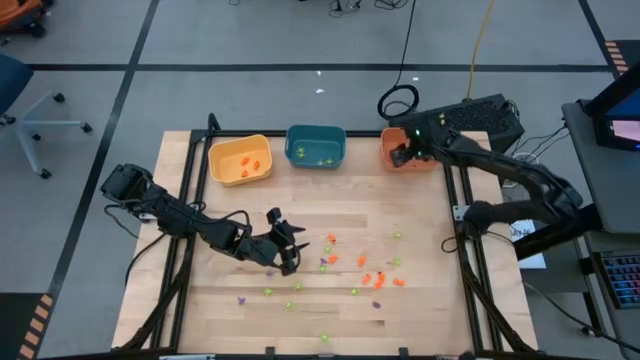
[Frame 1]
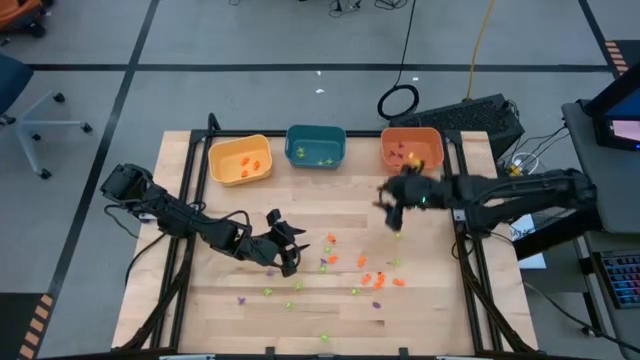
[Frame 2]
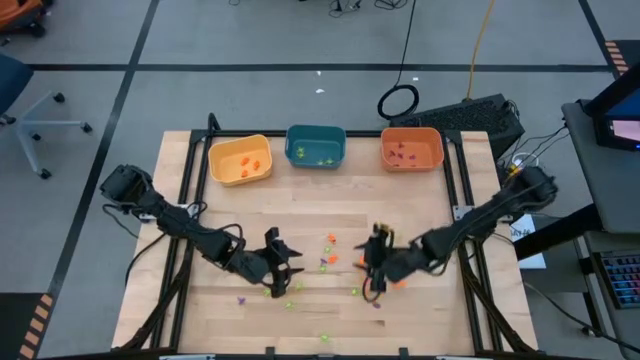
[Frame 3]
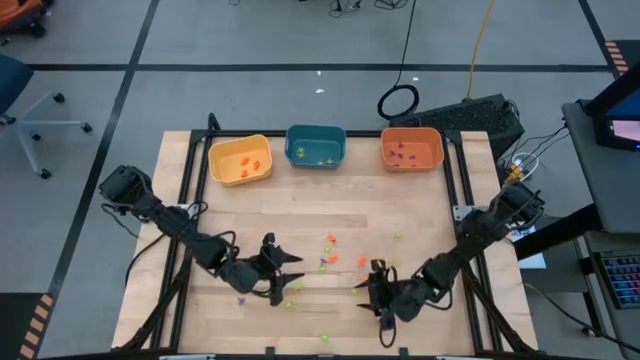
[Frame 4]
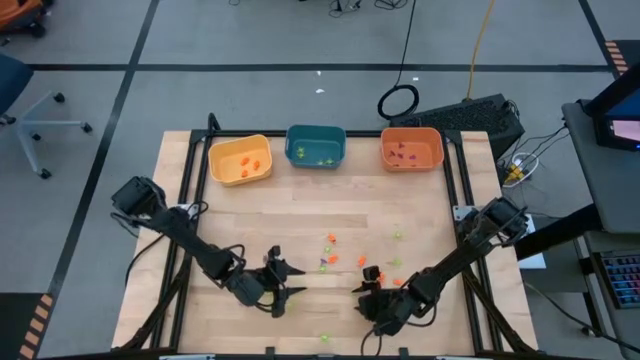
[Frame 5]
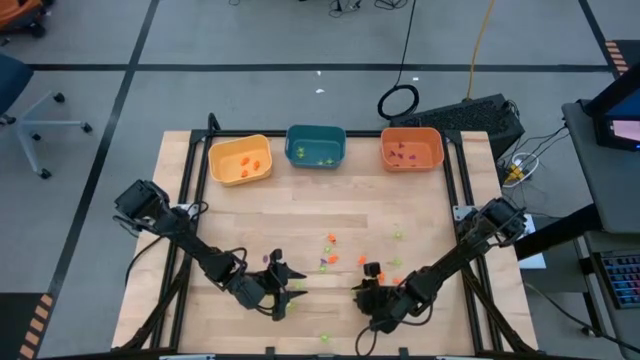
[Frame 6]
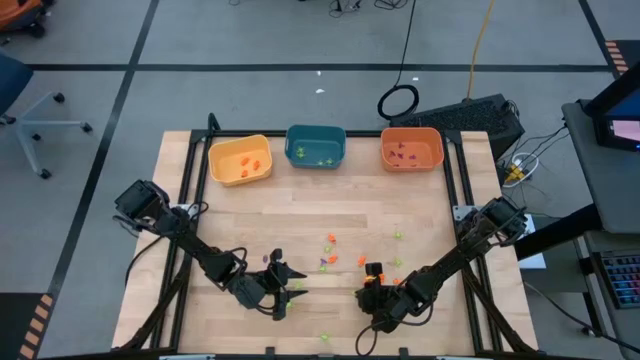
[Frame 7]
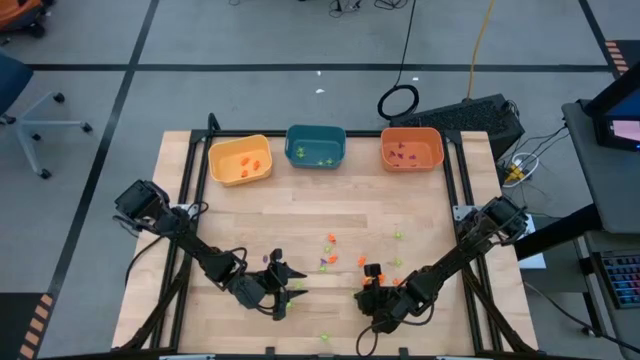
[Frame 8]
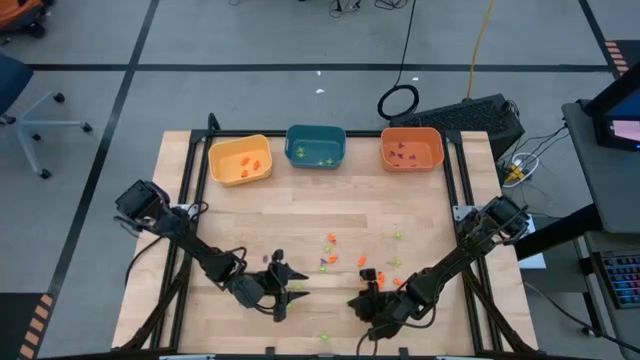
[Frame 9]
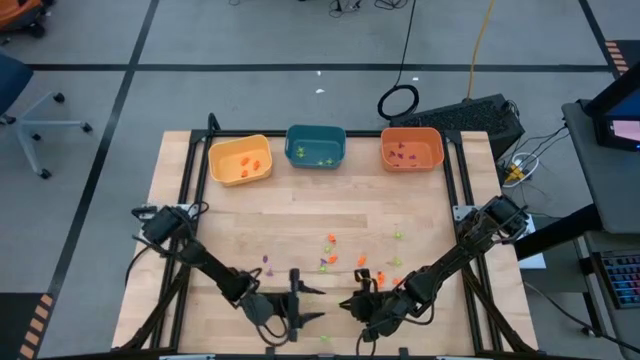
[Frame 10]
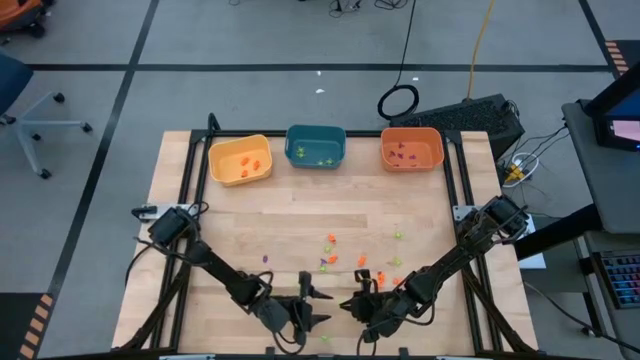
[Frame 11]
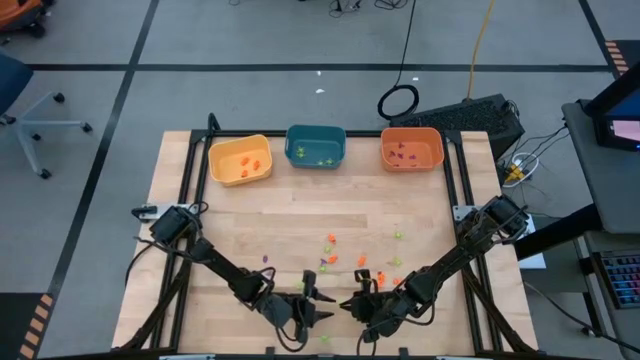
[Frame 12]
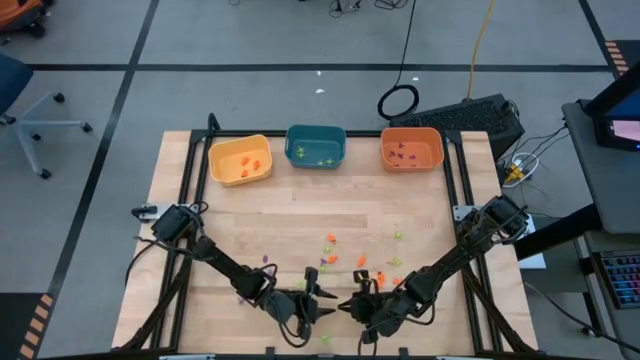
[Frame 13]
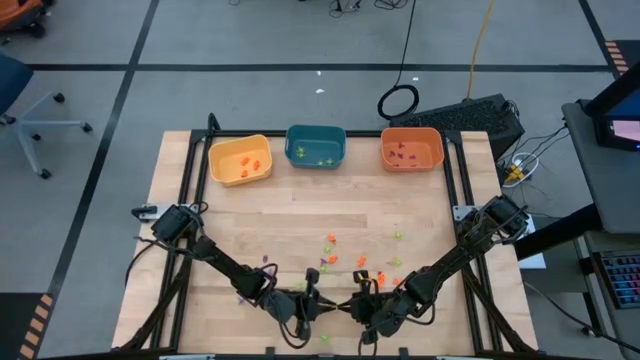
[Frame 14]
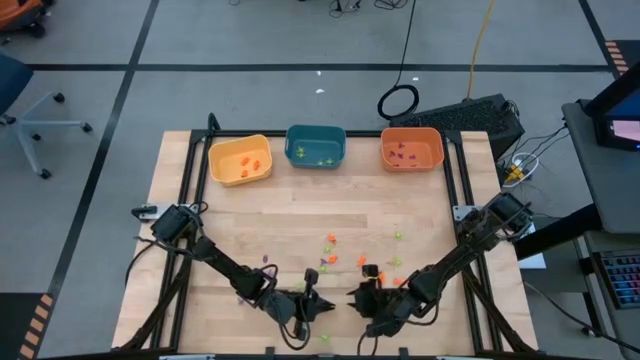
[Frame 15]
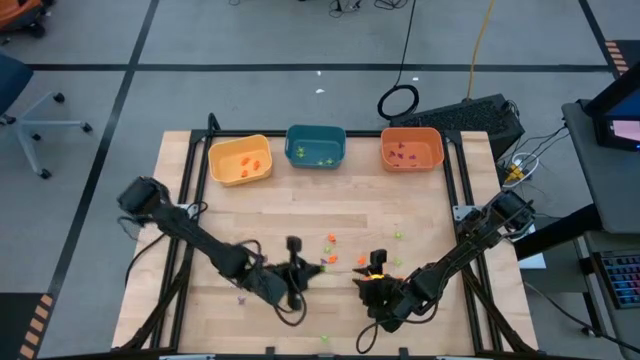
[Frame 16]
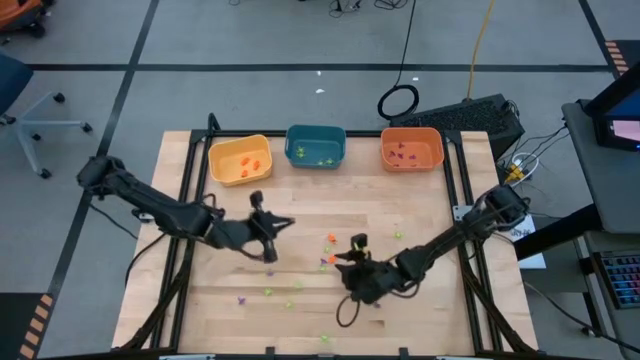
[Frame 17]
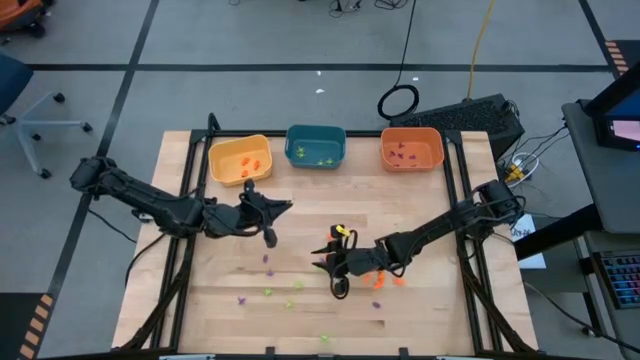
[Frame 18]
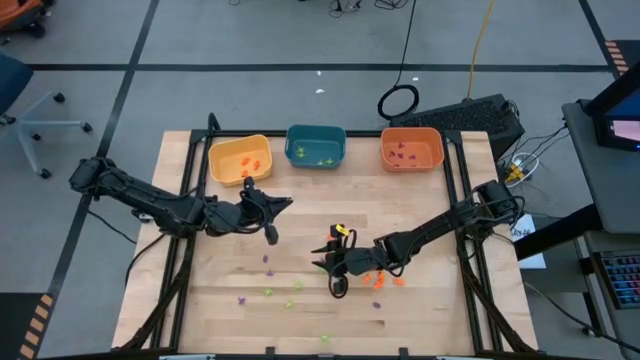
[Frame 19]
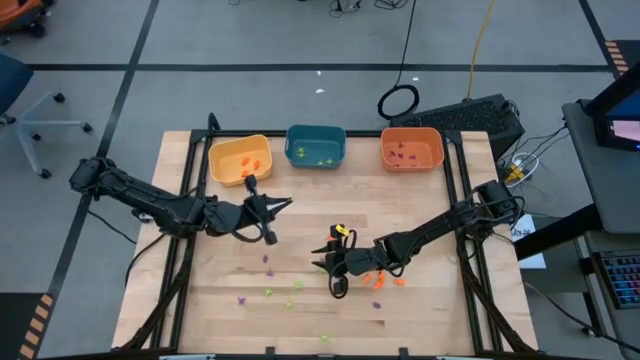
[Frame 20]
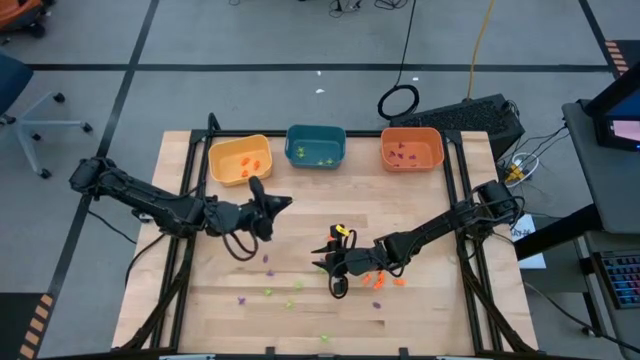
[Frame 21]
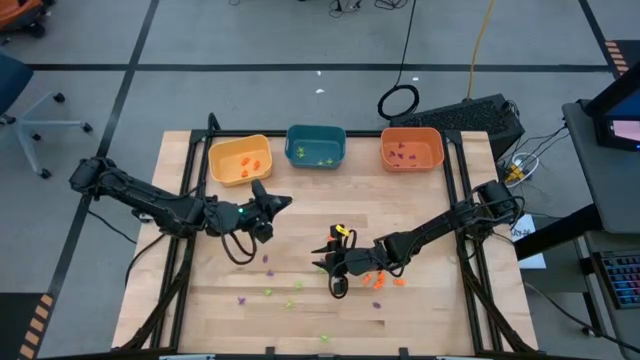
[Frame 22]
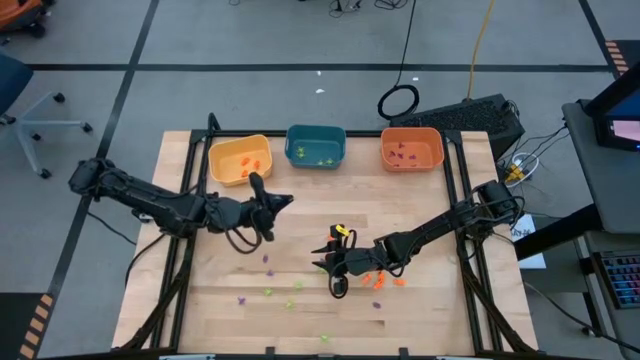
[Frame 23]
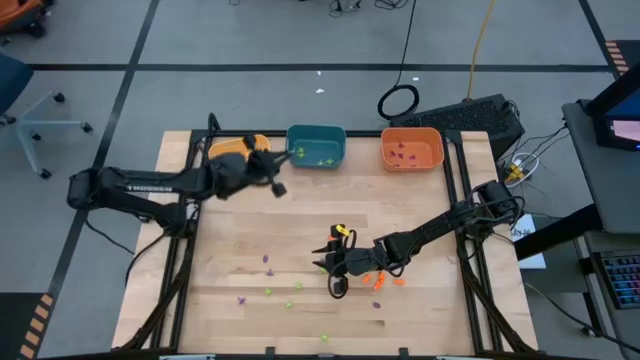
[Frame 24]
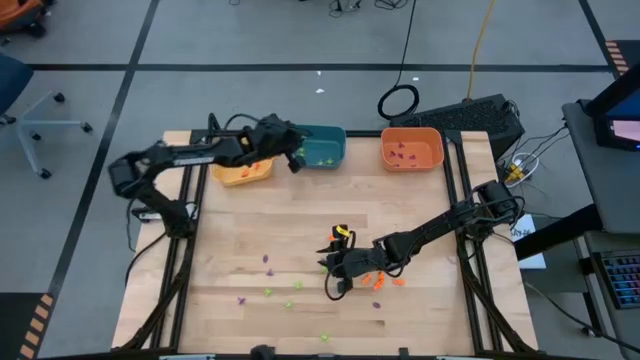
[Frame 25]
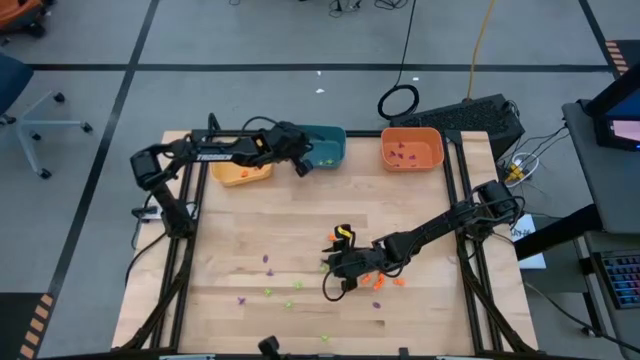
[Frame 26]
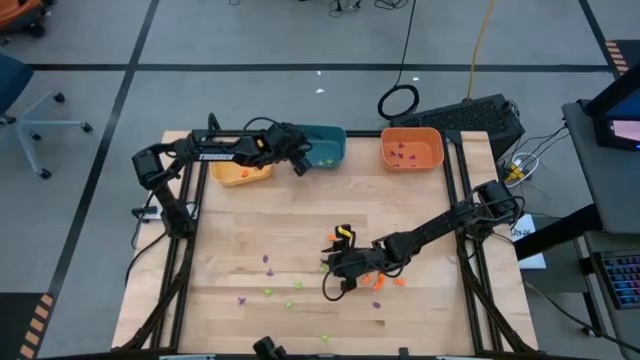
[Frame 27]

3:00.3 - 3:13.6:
Task: Sort Halloween decoration
Put the green spider toy into the blue bin

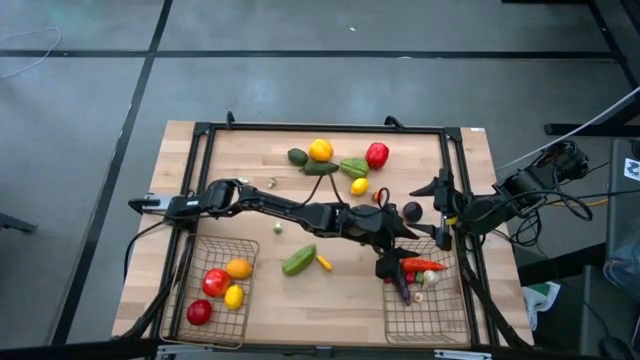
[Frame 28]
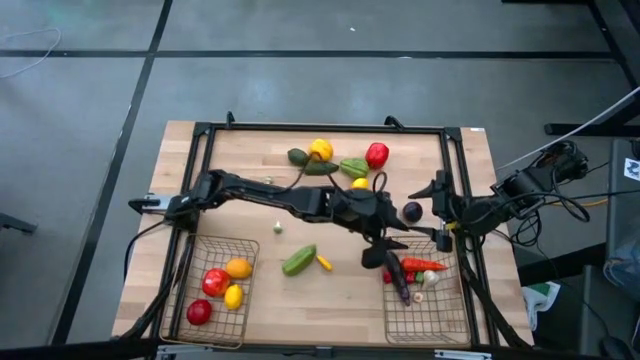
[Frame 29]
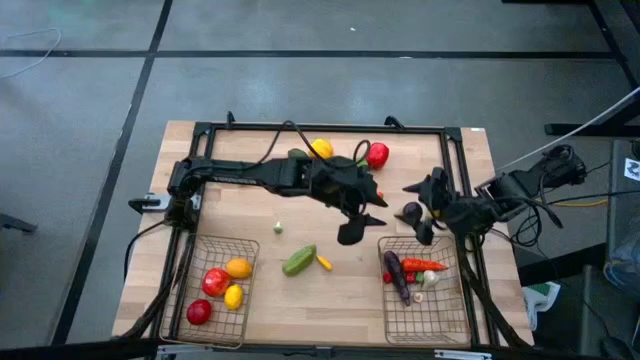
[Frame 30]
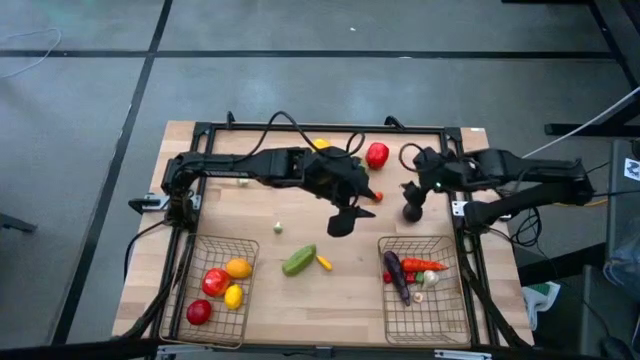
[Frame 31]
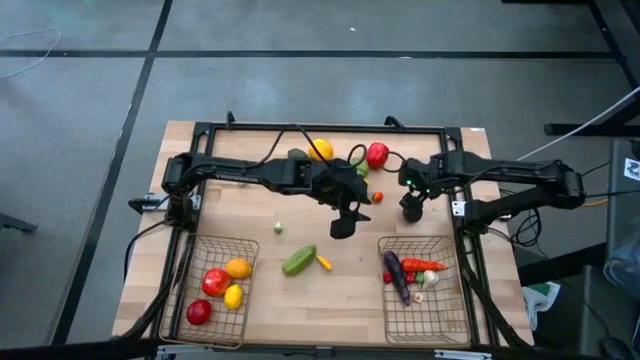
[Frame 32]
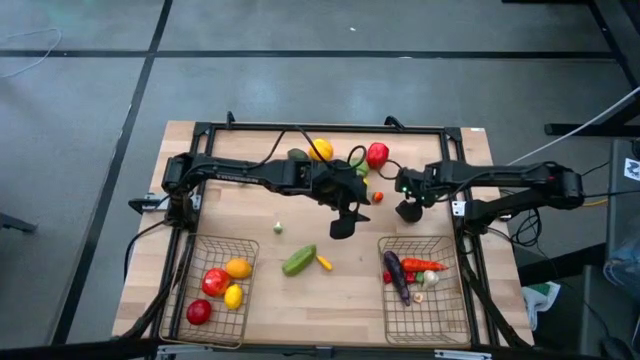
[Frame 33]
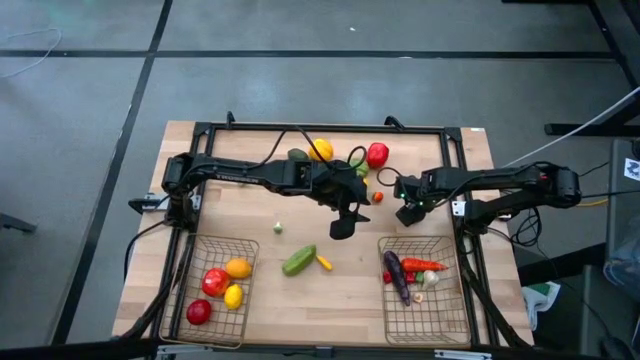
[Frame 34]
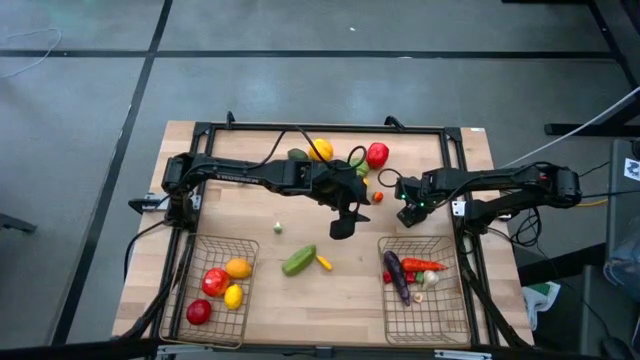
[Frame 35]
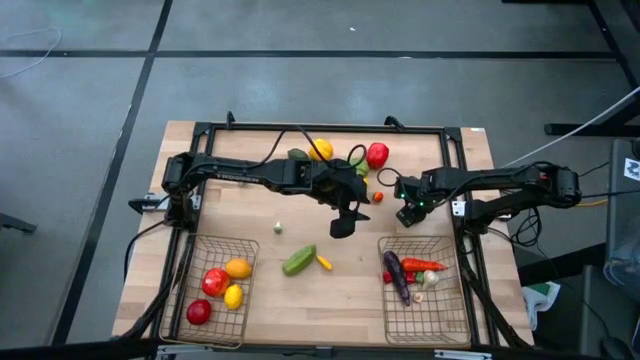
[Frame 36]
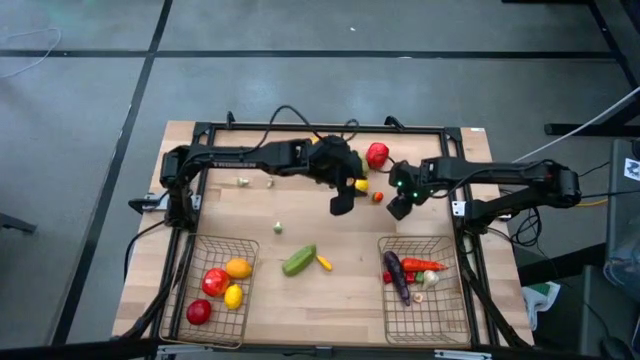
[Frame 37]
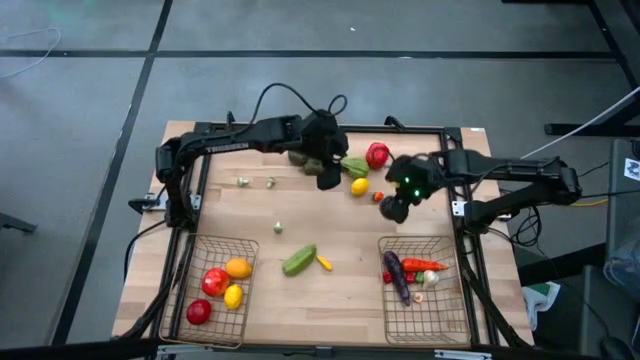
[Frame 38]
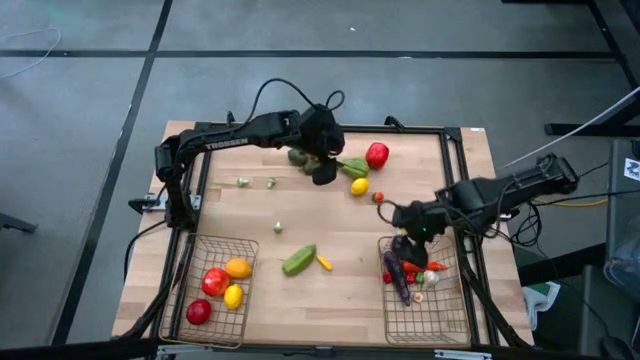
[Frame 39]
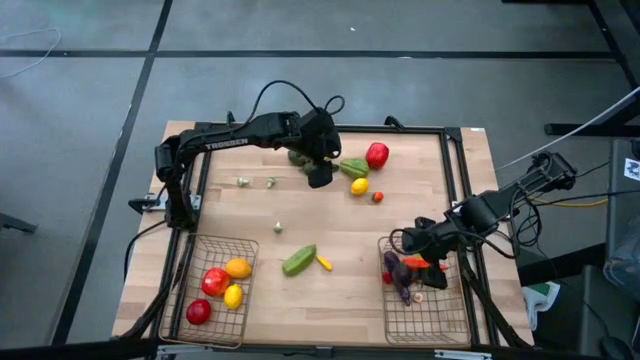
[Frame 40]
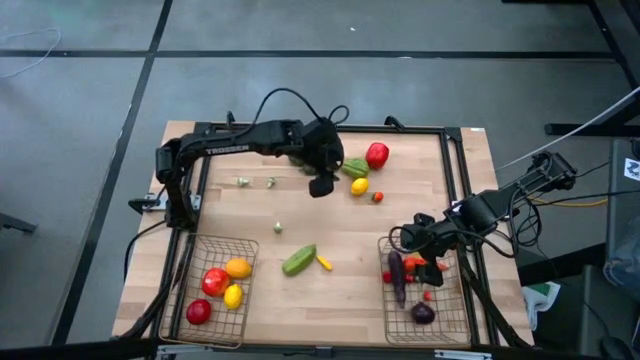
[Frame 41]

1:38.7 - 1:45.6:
Task: Sort produce into baskets
Put the purple onion into the right wire basket
